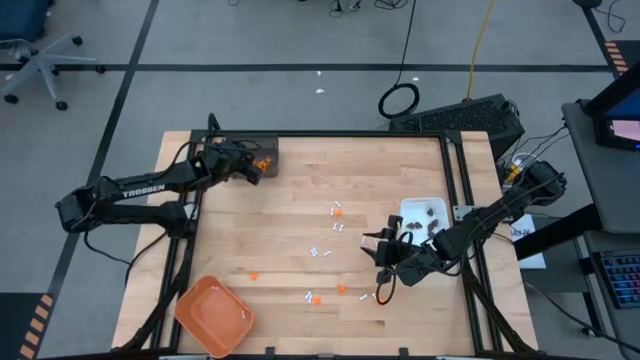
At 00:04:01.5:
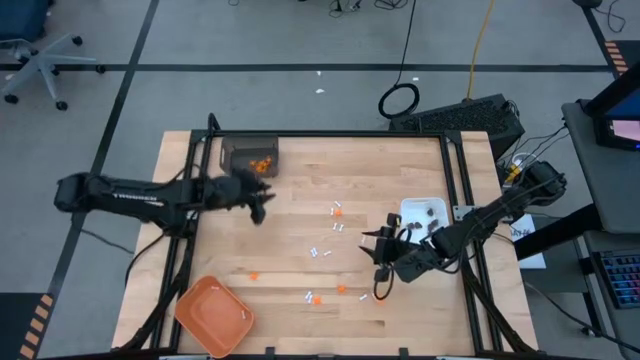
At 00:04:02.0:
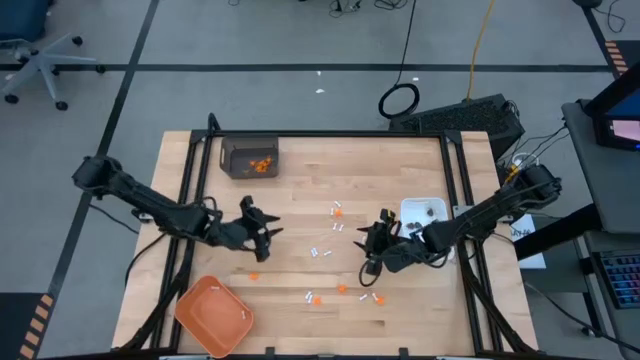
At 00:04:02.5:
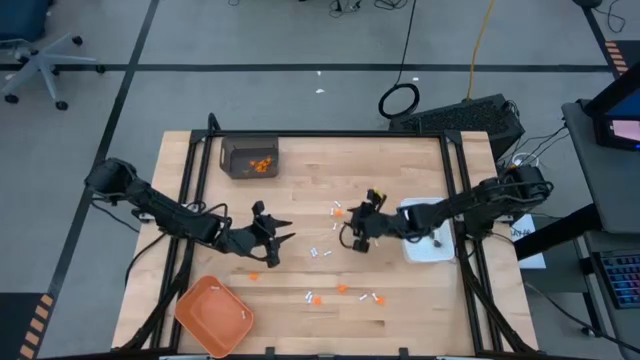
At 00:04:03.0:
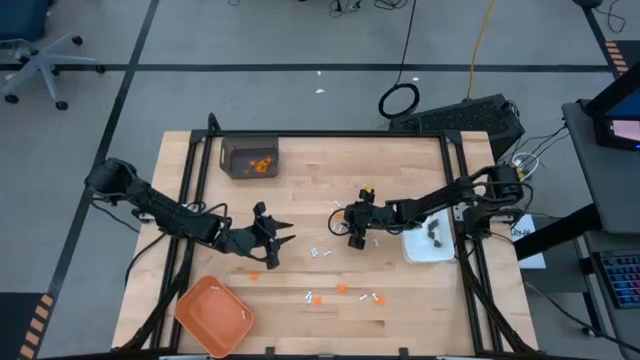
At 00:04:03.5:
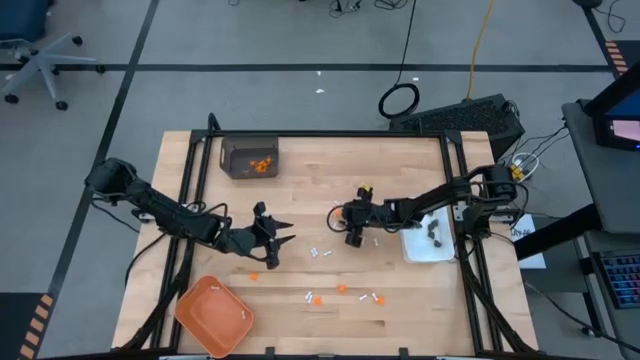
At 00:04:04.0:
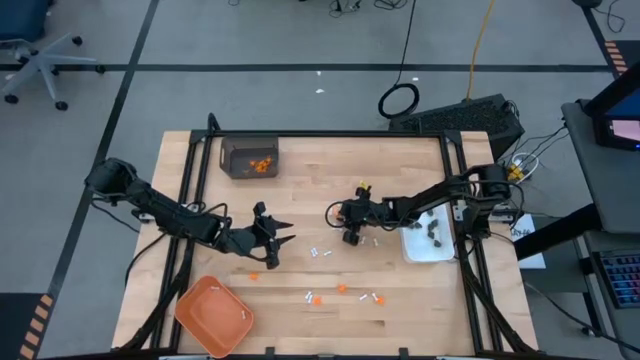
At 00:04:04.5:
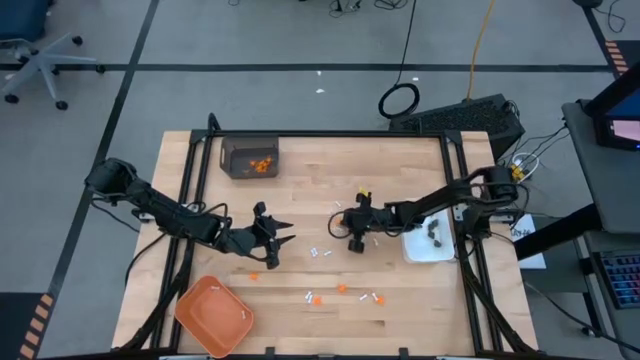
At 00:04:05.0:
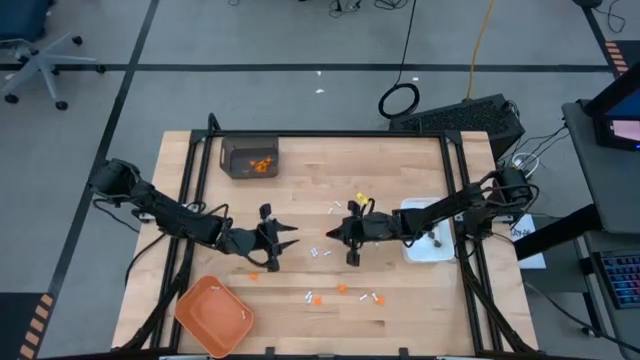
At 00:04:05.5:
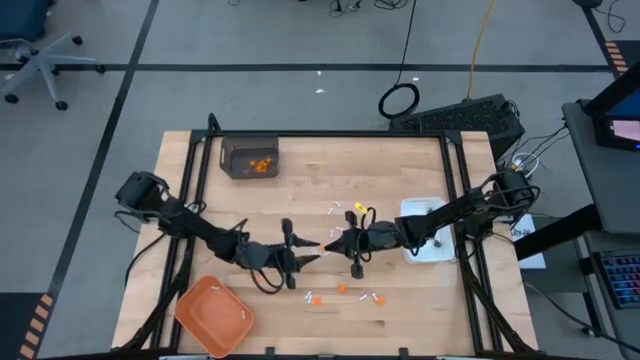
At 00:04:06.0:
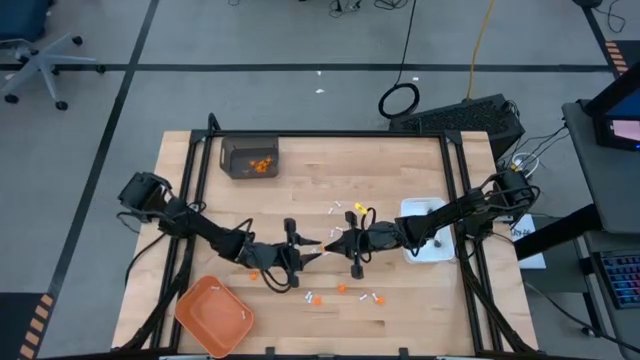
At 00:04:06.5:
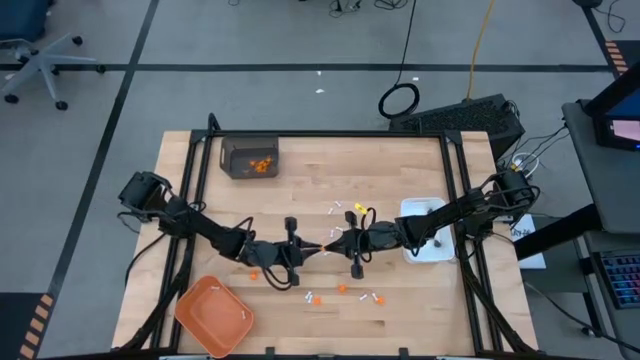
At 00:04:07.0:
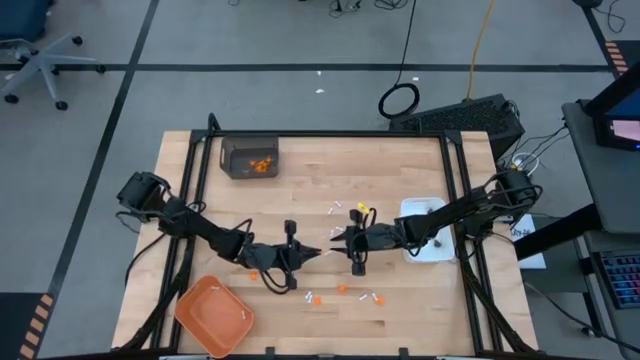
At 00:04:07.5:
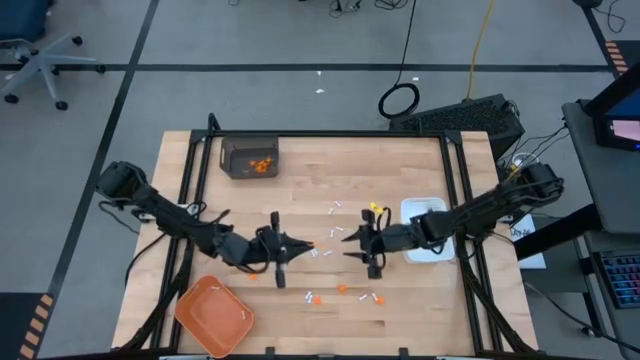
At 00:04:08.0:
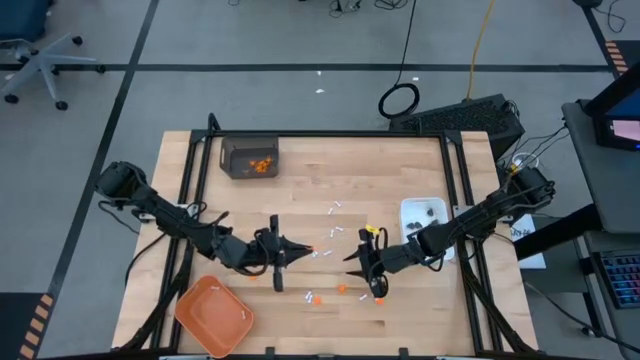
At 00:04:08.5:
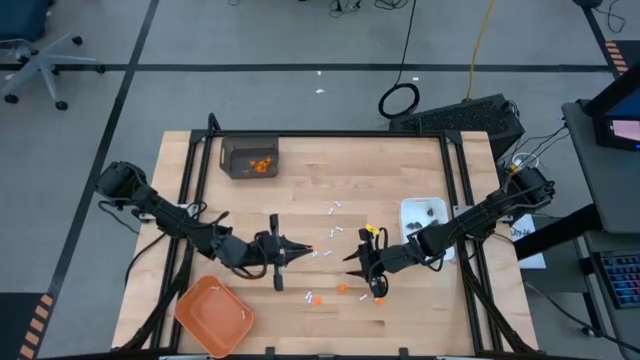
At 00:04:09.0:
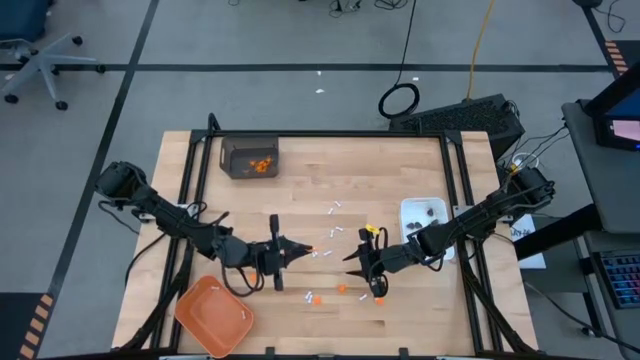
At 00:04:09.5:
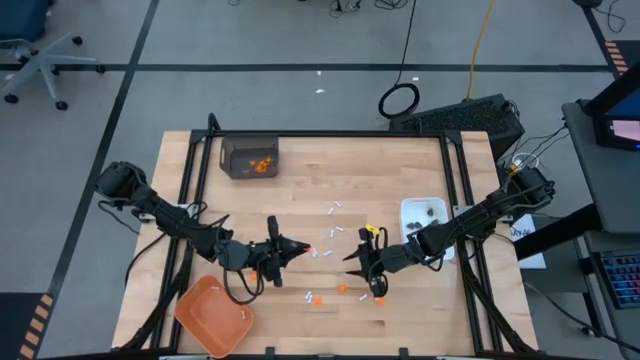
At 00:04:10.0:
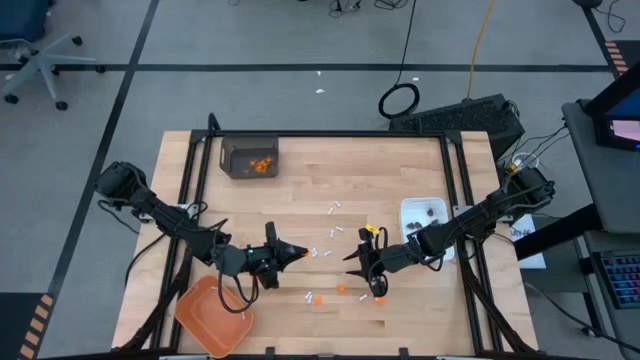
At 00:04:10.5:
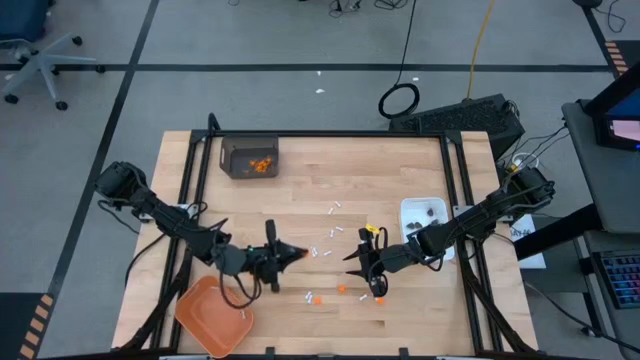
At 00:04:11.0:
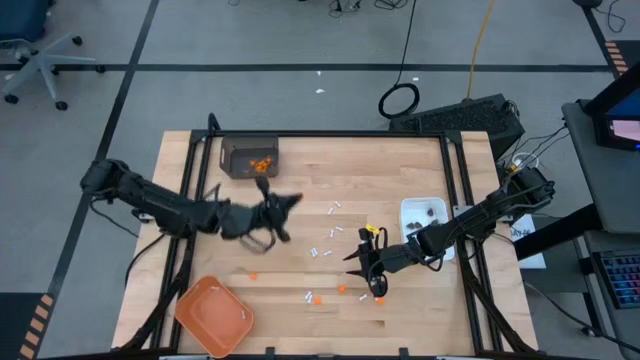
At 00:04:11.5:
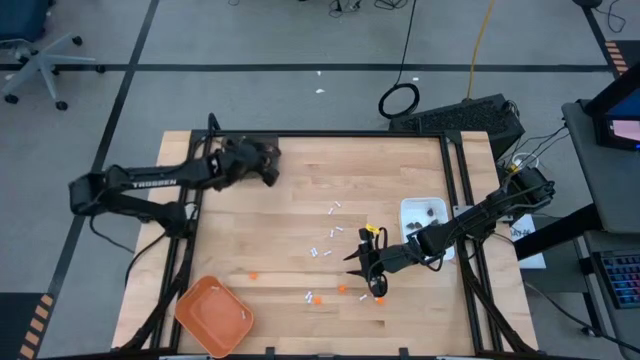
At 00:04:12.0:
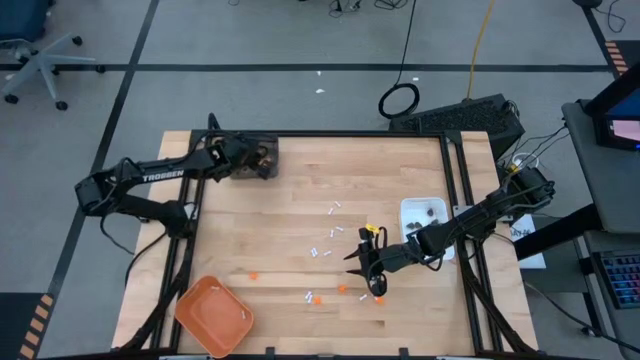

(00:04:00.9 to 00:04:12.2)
Task: Sort Halloween decoration
Put the orange spider toy into the black bin

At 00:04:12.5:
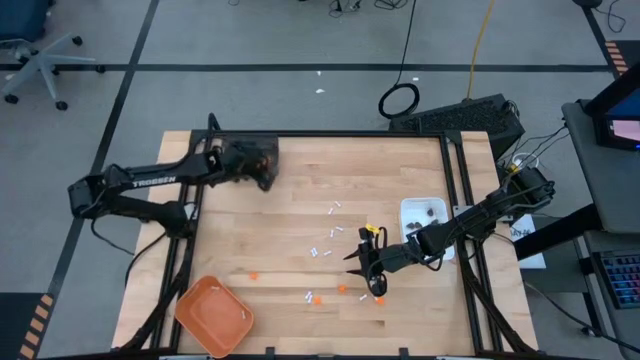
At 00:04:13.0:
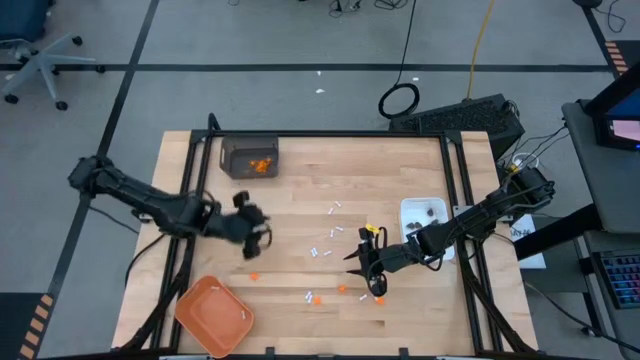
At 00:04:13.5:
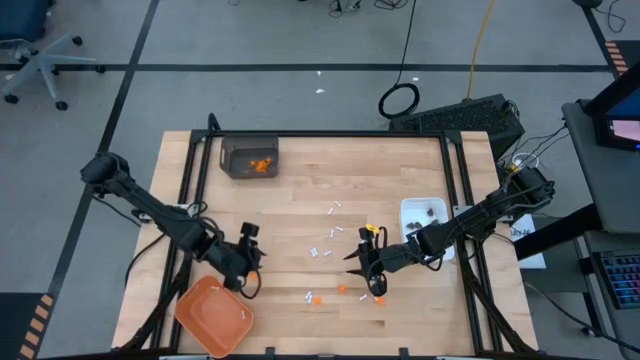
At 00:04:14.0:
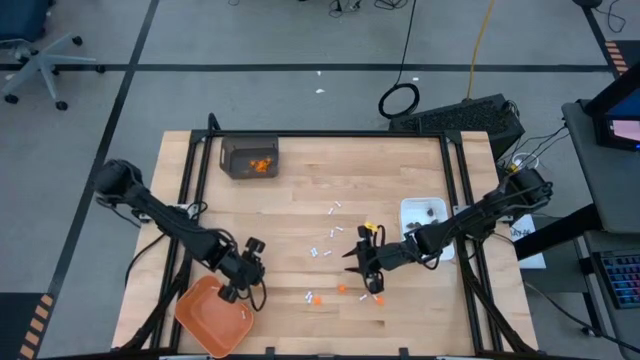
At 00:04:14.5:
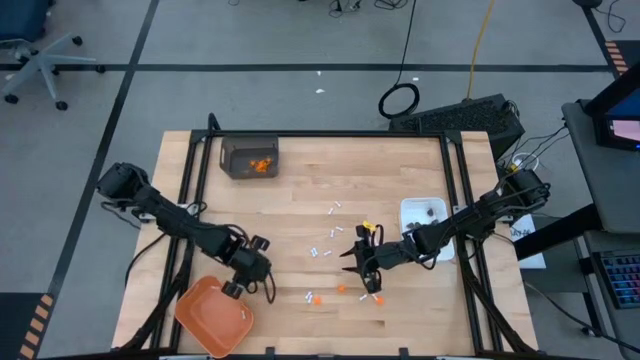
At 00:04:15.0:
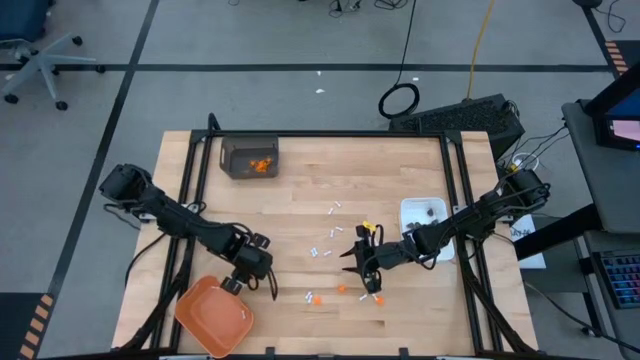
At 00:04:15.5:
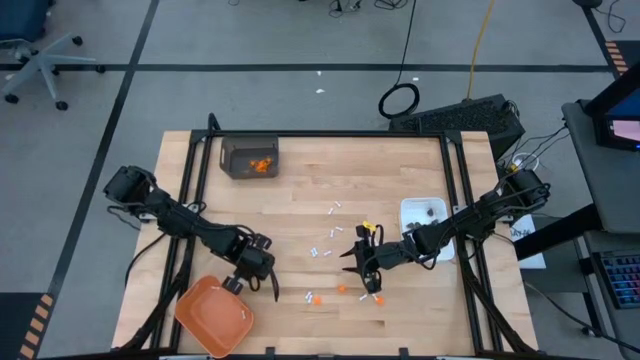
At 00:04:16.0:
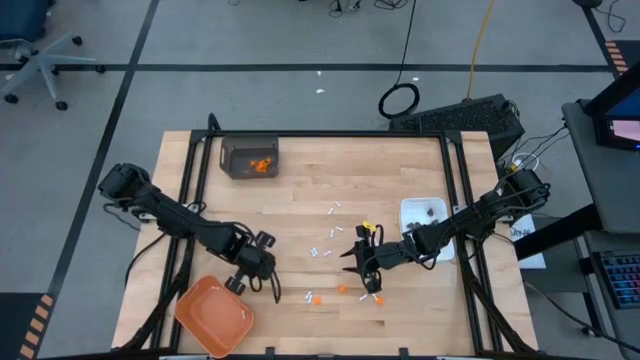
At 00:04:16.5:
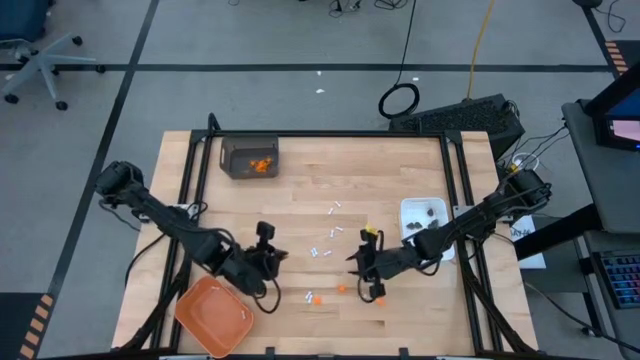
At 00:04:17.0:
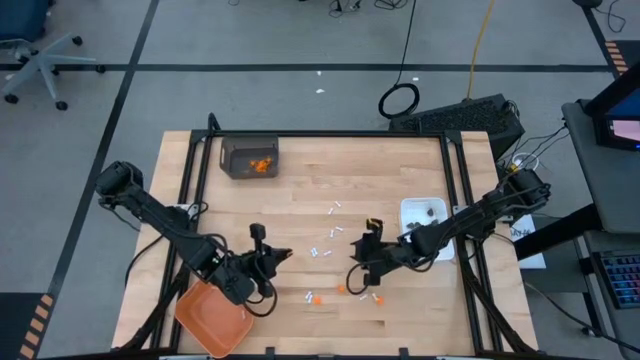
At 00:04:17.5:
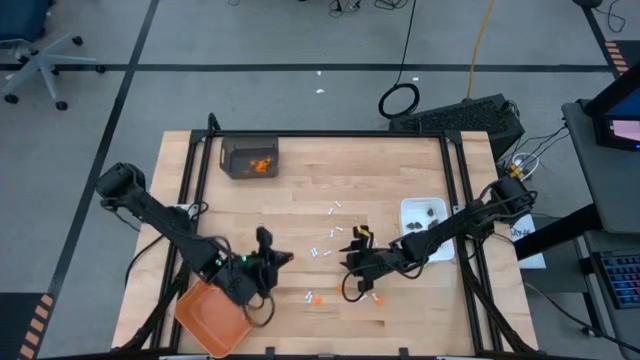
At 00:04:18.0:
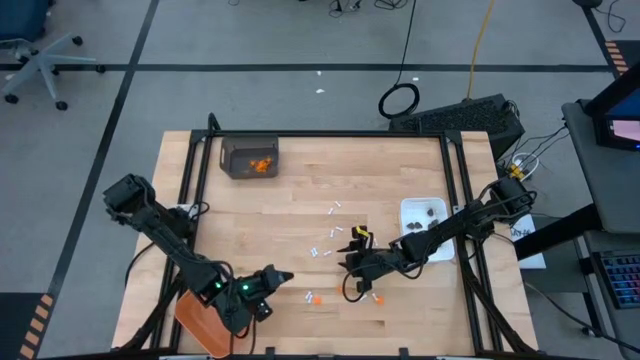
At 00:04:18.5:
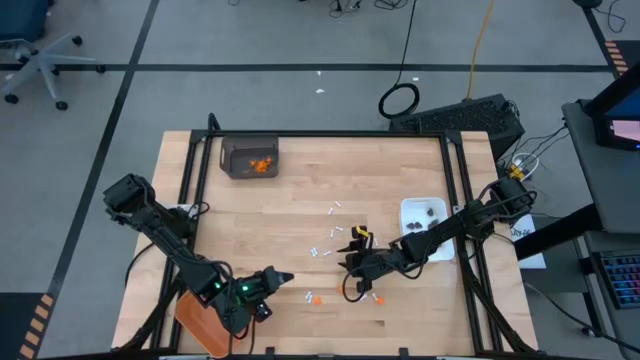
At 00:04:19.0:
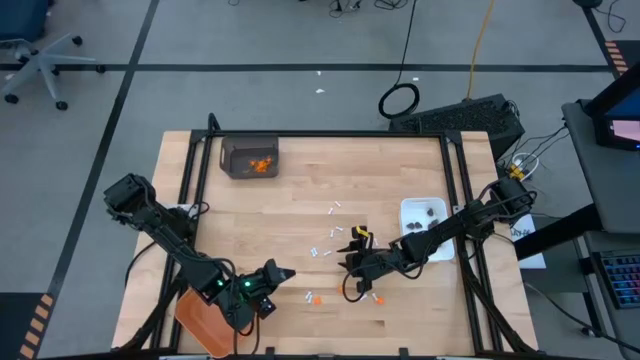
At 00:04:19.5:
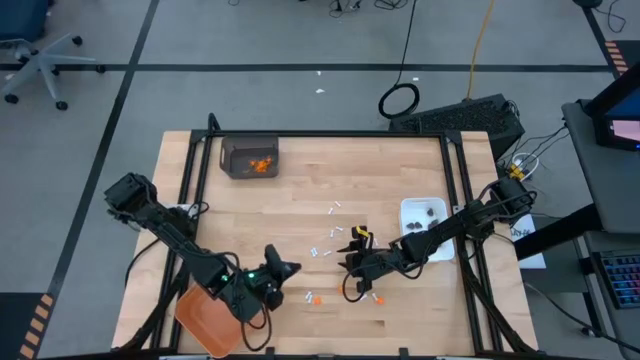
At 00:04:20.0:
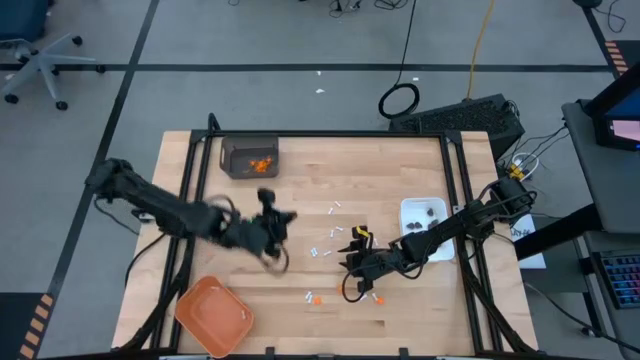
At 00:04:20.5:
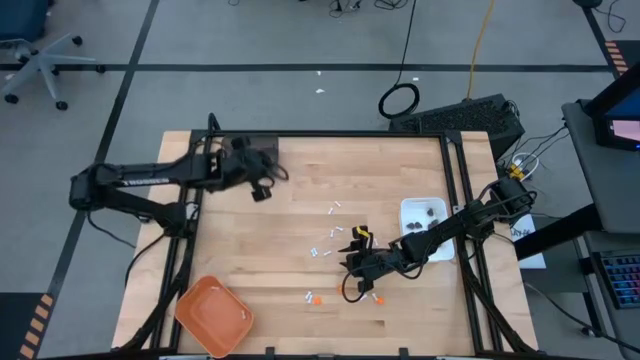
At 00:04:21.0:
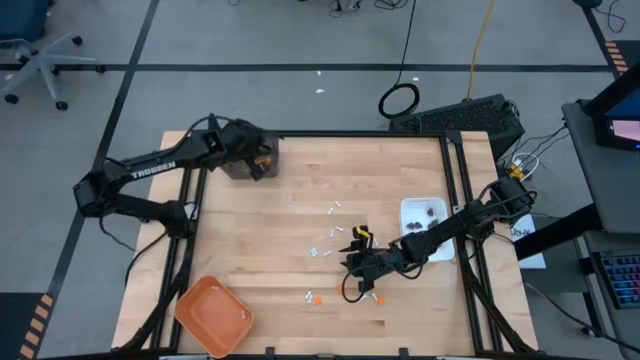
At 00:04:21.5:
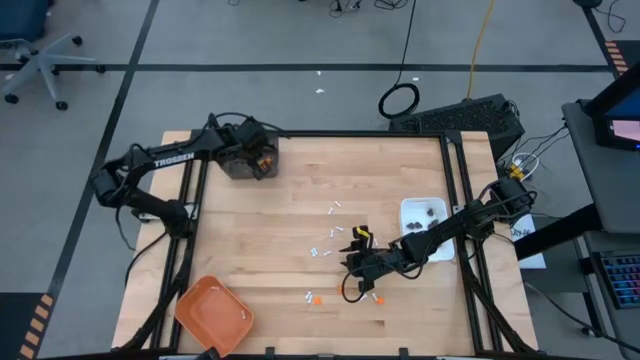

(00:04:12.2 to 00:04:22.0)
Put the orange spider toy into the black bin
